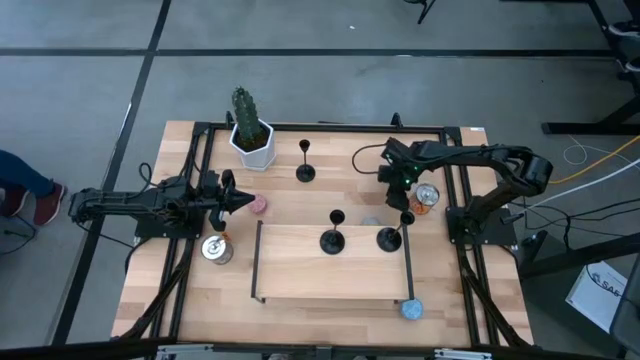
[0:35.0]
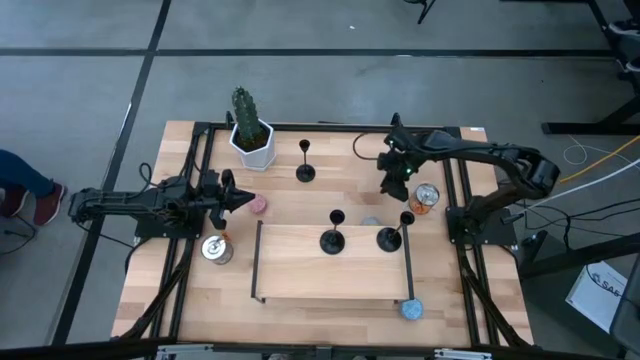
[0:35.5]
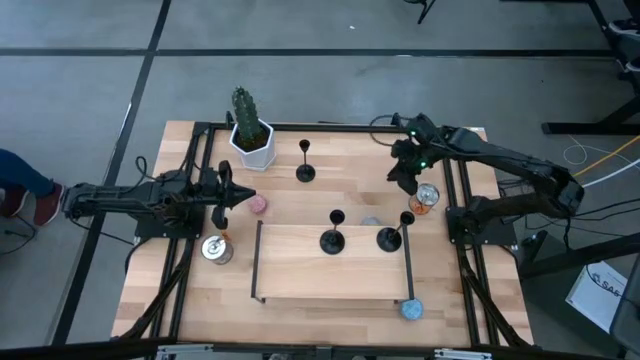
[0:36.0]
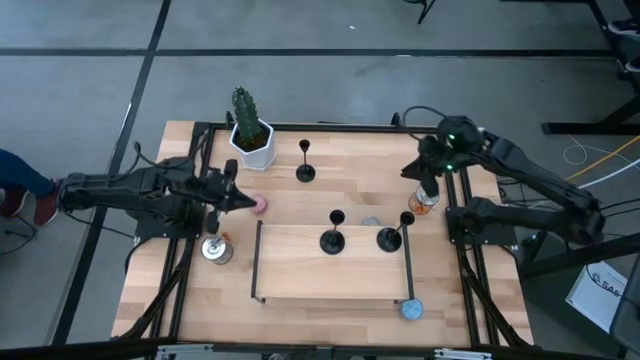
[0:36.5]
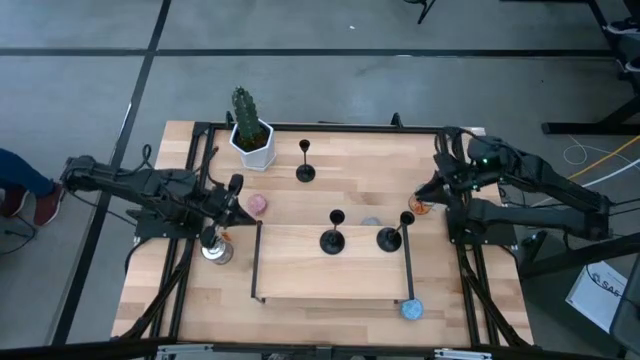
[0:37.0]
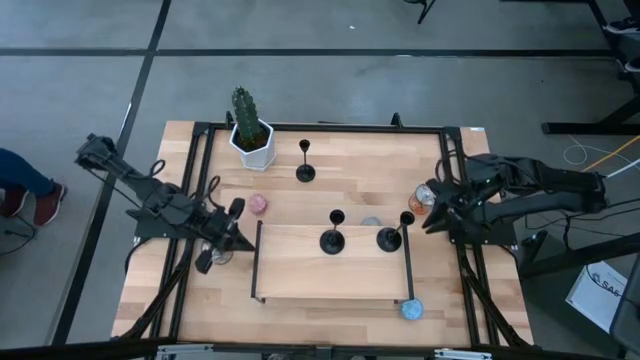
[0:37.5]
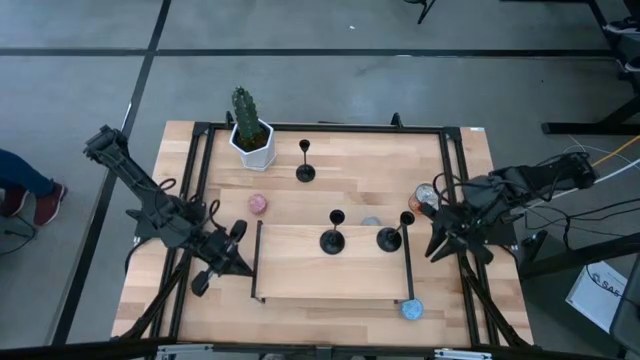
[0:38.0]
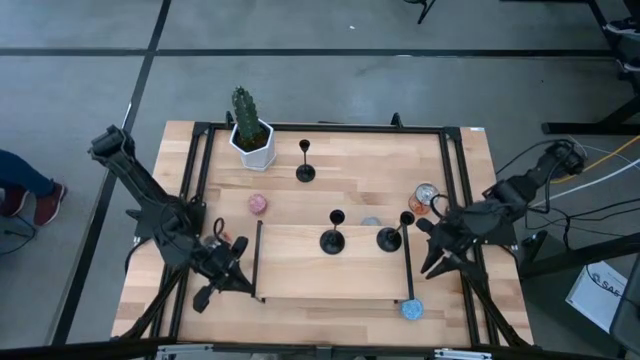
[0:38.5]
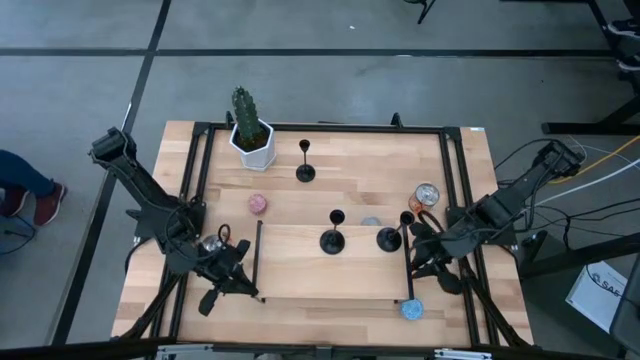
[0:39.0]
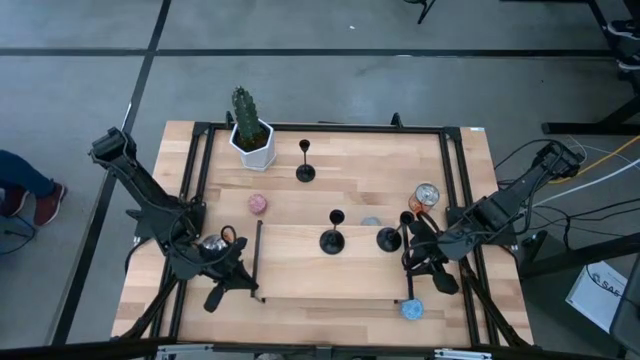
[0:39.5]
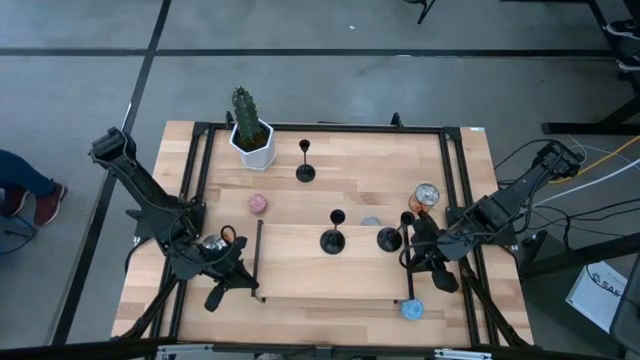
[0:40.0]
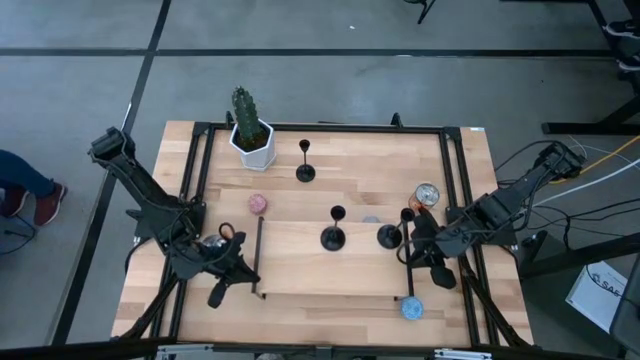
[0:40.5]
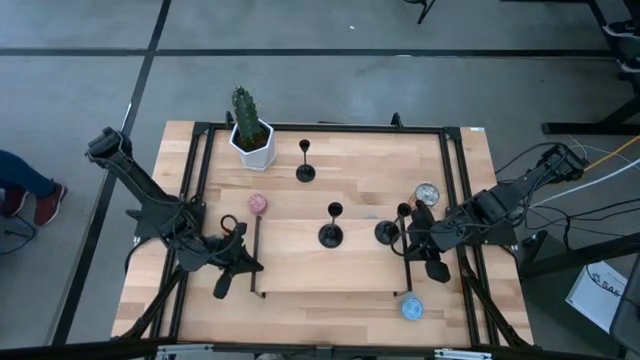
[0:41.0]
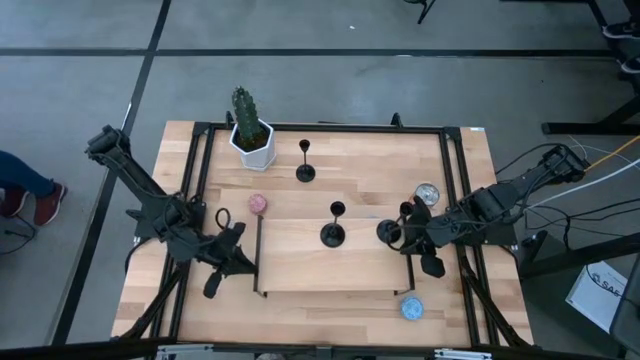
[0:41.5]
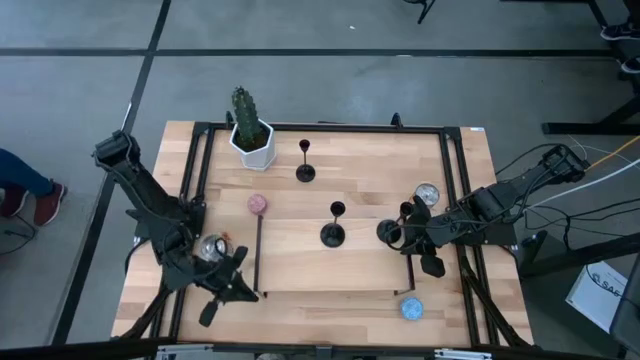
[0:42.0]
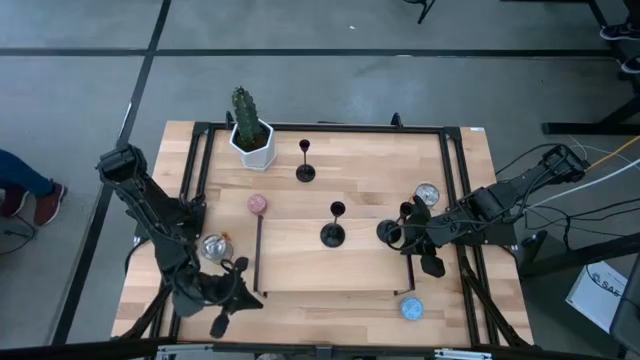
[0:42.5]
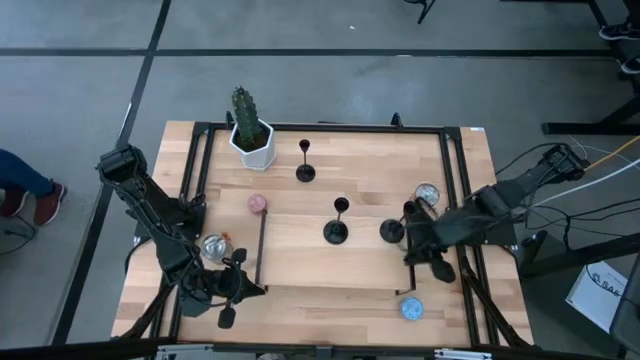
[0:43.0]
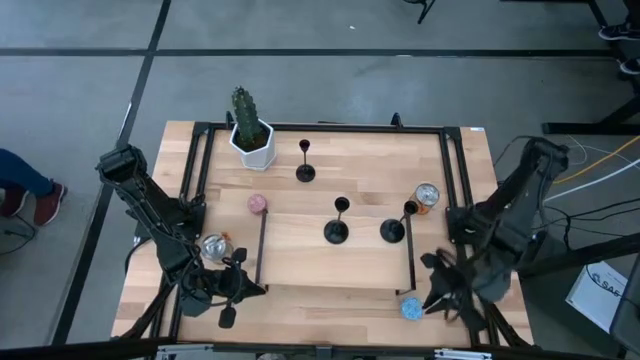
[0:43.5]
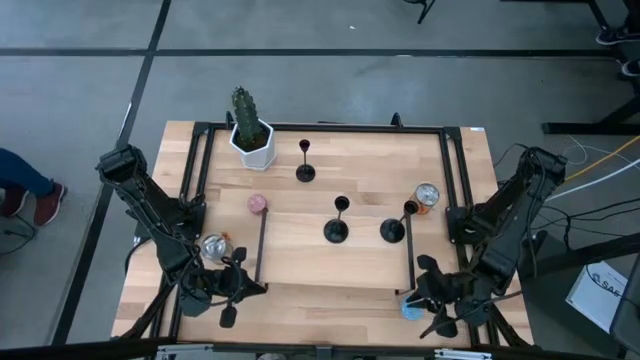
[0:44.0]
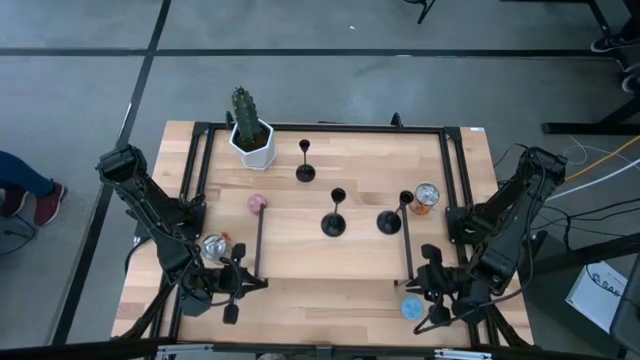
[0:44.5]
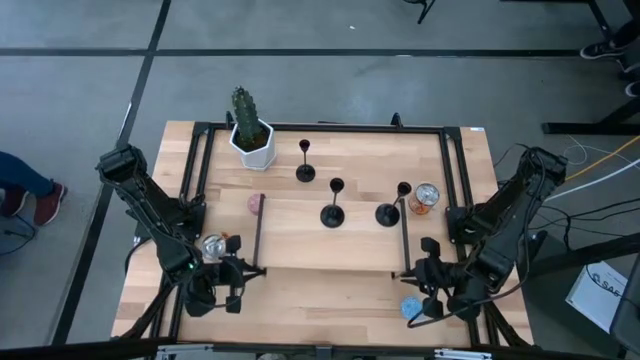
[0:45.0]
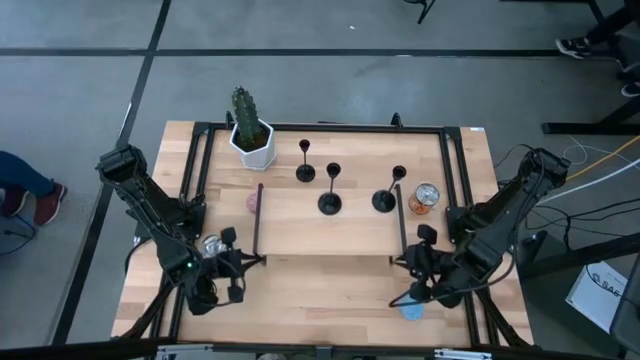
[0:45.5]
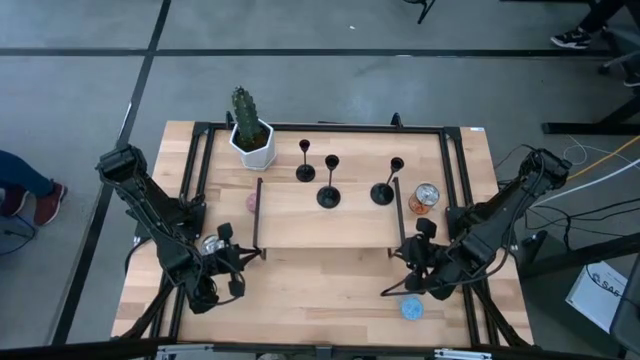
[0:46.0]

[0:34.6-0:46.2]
Task: Pick & Place candle stick holders
Adjust the shelf to the center of the table

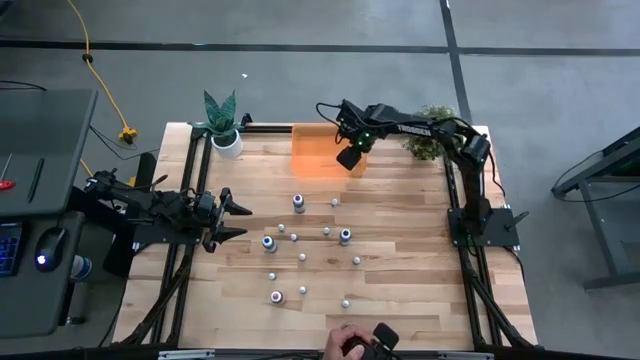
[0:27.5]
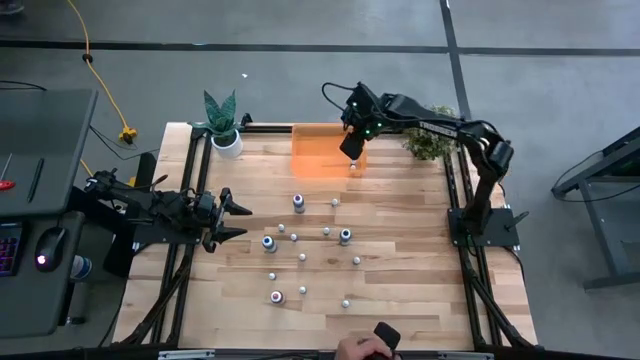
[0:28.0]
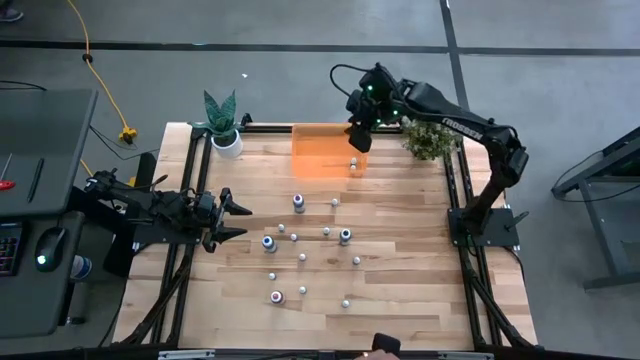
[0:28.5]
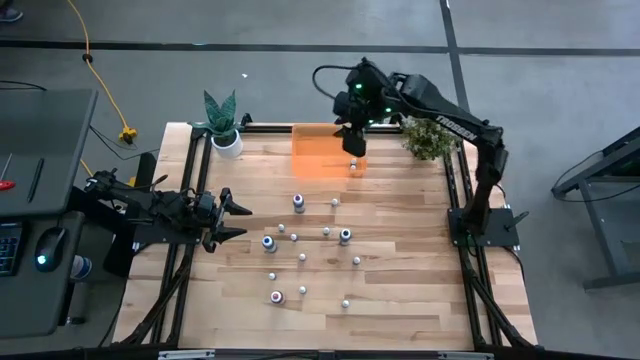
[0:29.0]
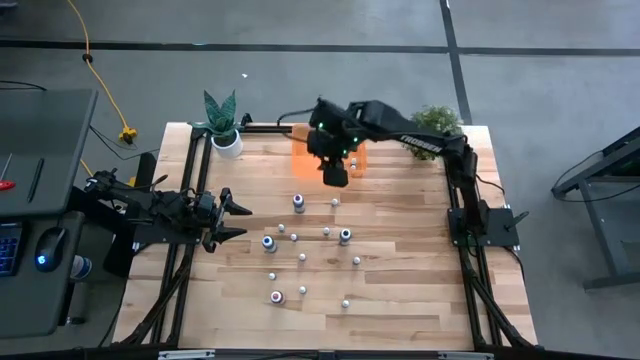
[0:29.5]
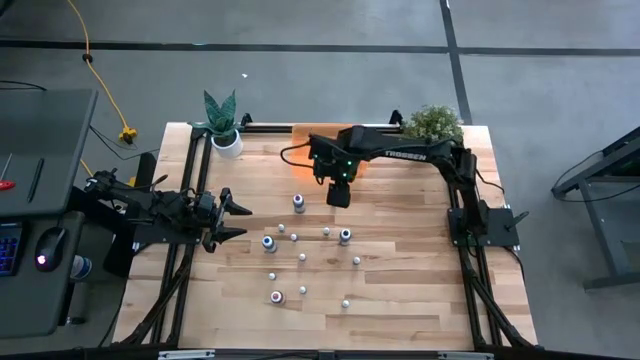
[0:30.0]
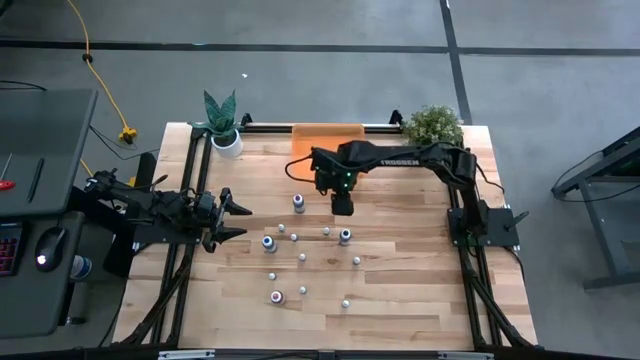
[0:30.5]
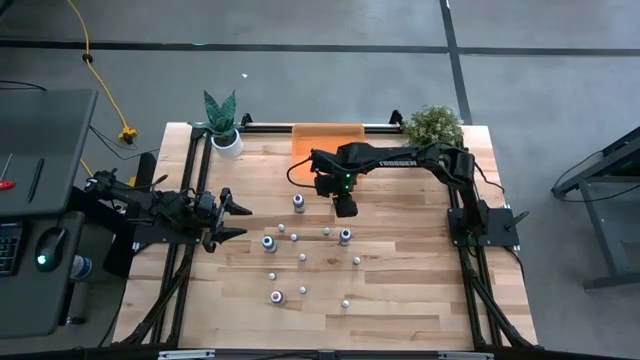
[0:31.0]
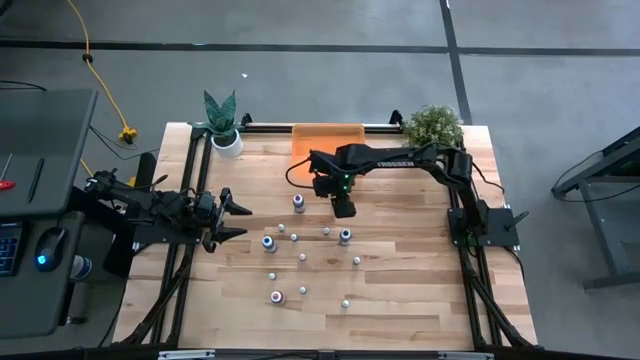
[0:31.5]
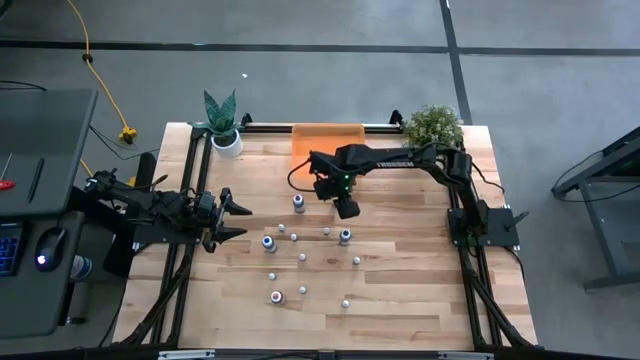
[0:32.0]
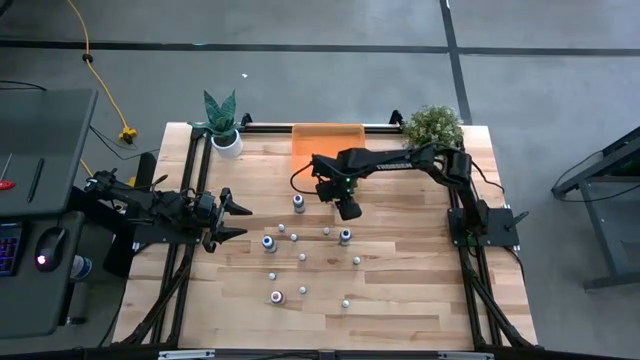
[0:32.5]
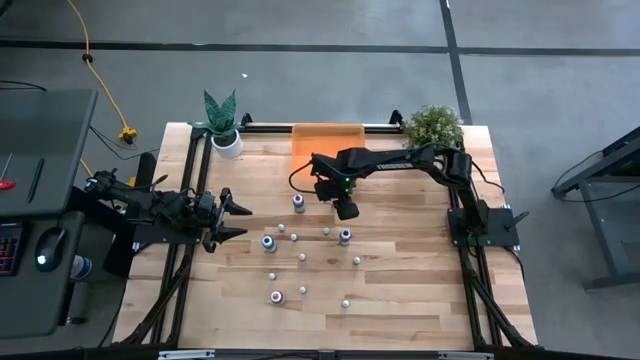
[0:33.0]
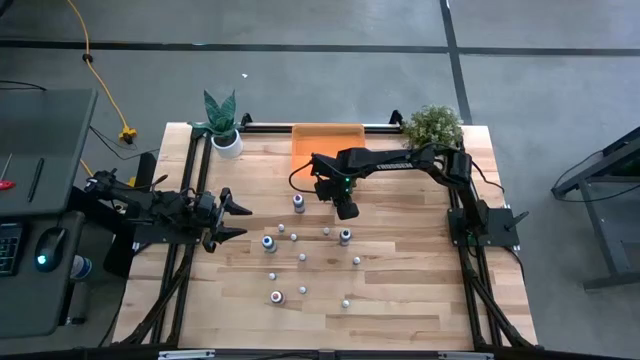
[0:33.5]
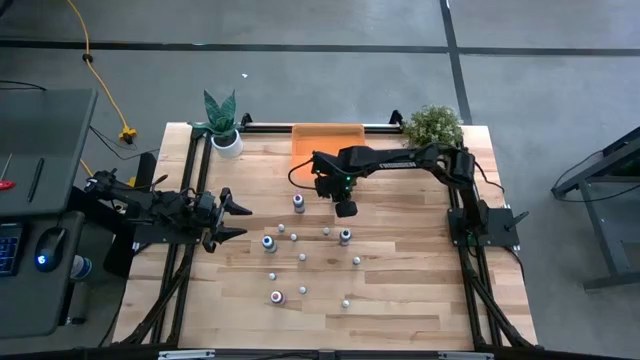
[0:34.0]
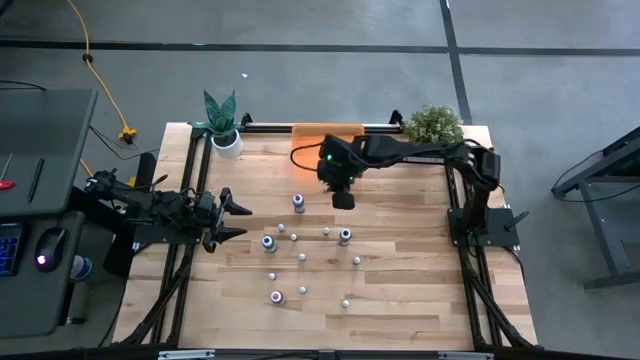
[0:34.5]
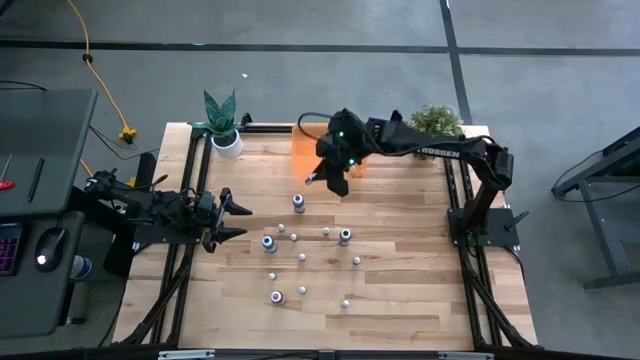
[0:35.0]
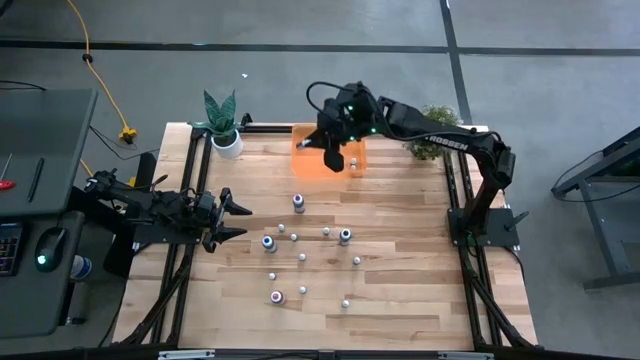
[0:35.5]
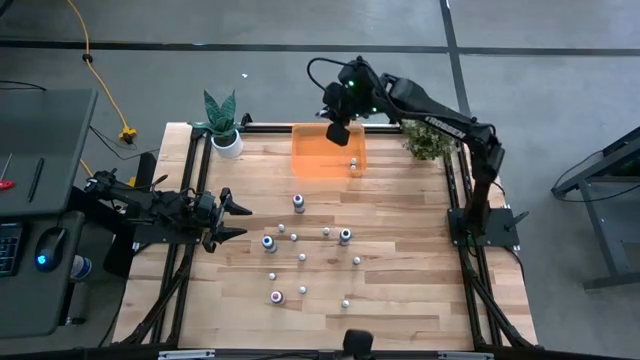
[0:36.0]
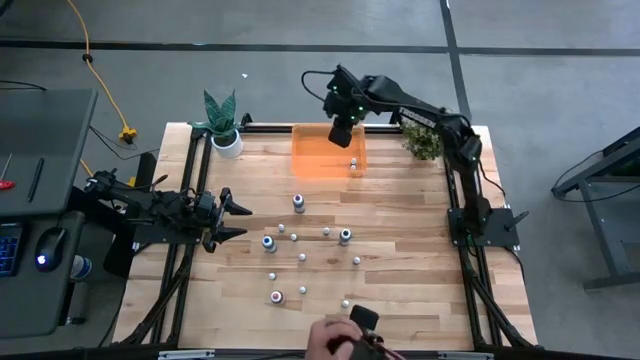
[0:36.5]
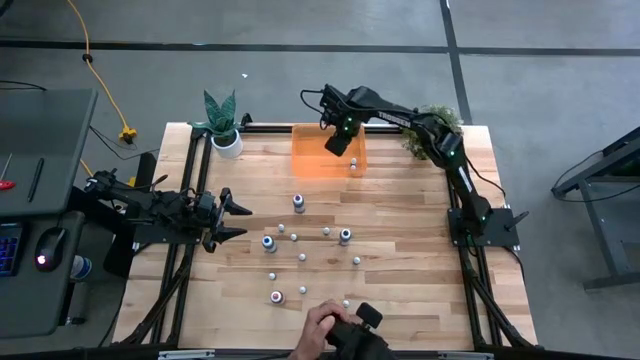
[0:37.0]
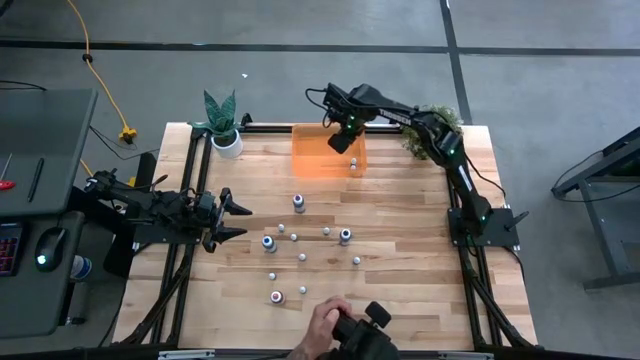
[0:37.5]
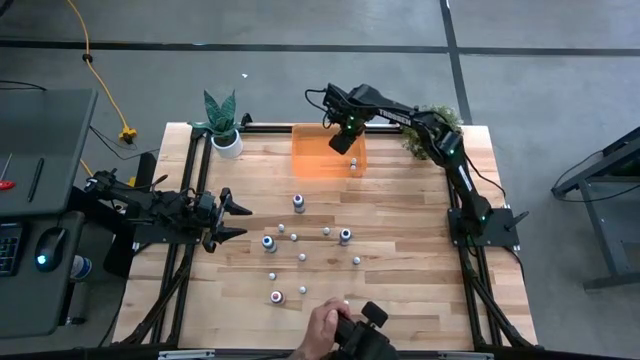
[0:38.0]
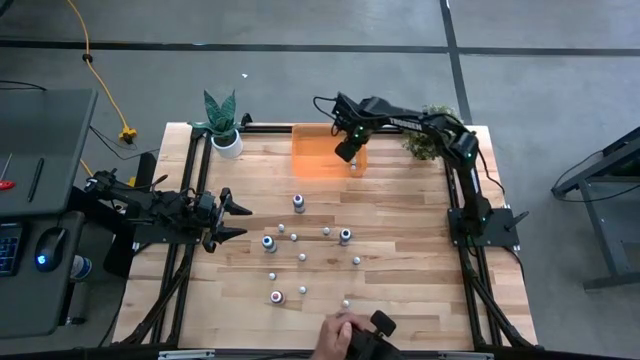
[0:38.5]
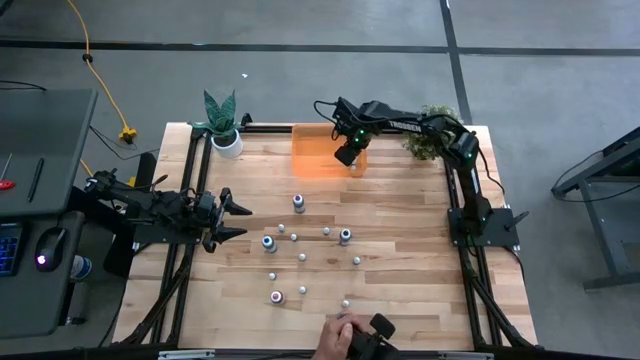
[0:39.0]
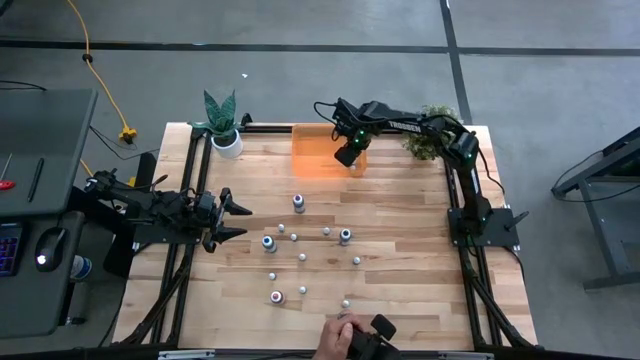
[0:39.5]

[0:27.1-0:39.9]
Task: Pick & Place food coloring
Put the small black food coloring bottle into the orange bin
